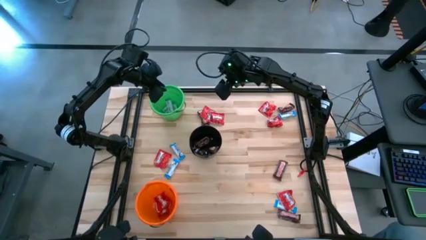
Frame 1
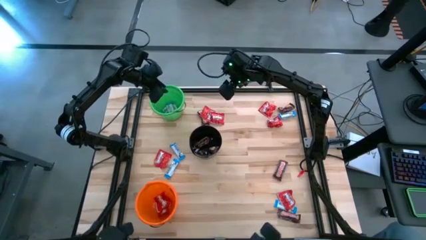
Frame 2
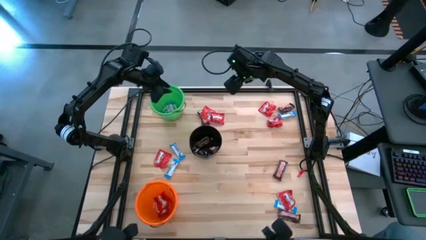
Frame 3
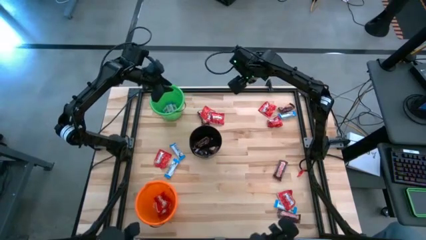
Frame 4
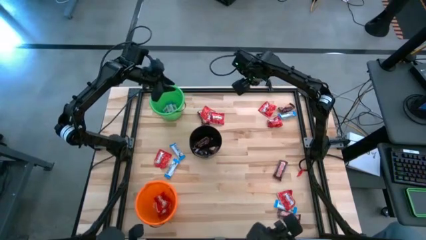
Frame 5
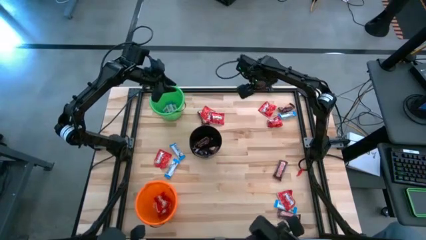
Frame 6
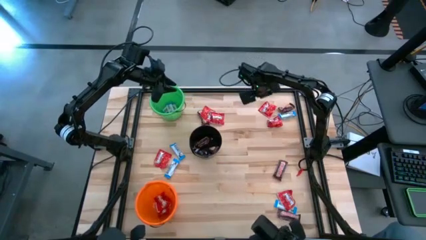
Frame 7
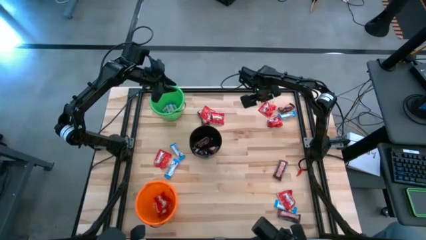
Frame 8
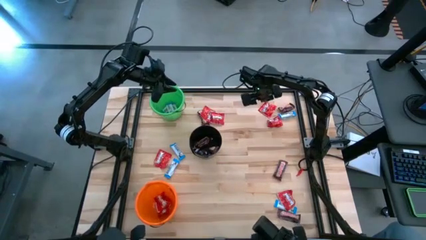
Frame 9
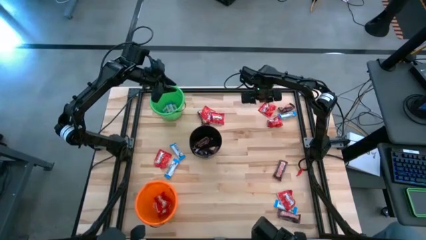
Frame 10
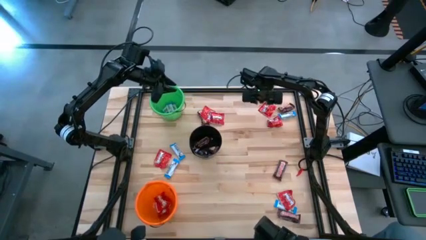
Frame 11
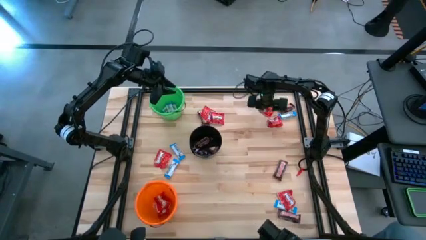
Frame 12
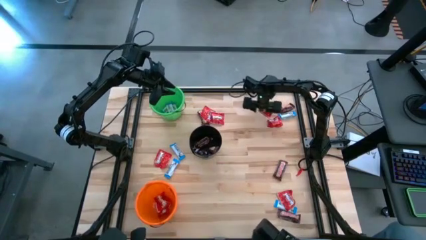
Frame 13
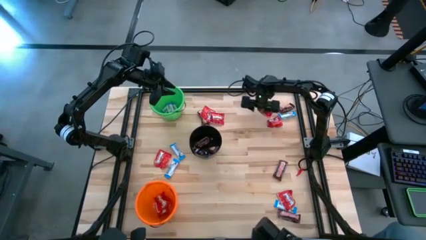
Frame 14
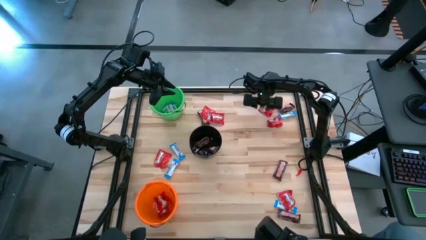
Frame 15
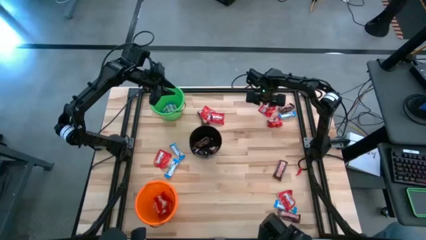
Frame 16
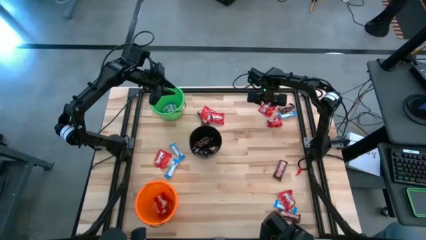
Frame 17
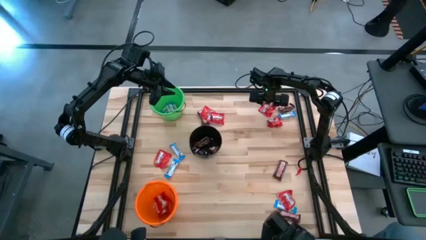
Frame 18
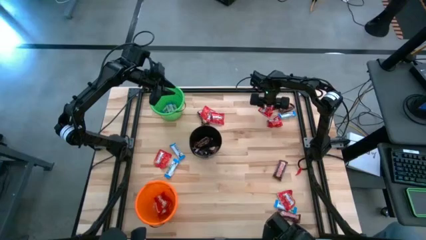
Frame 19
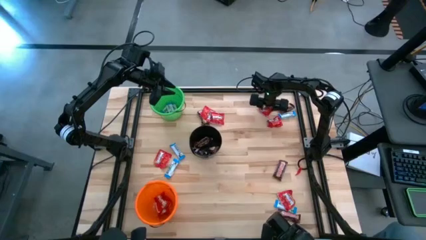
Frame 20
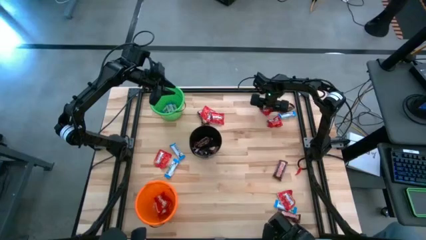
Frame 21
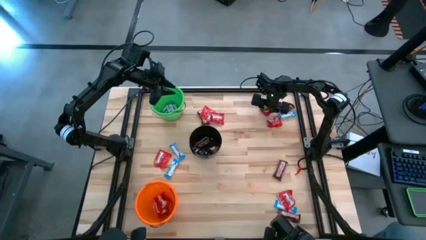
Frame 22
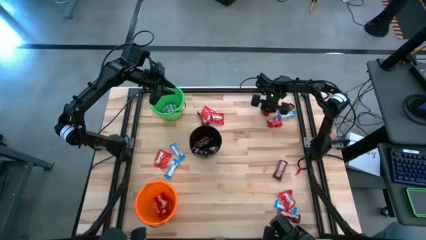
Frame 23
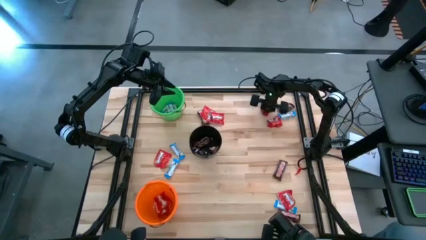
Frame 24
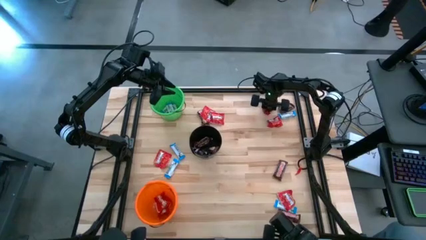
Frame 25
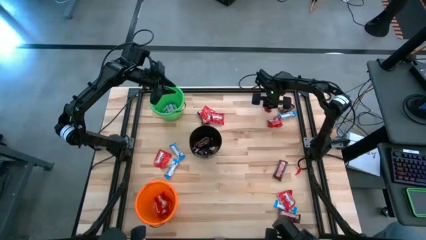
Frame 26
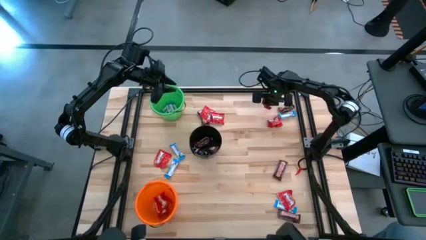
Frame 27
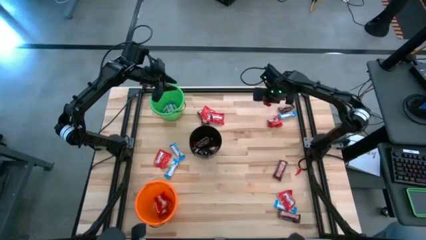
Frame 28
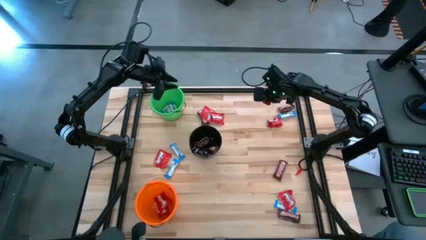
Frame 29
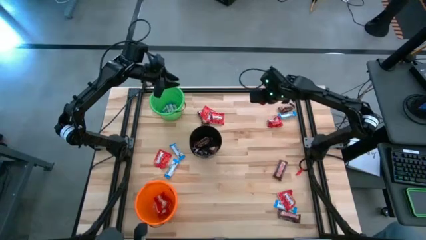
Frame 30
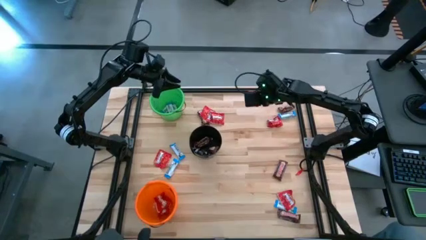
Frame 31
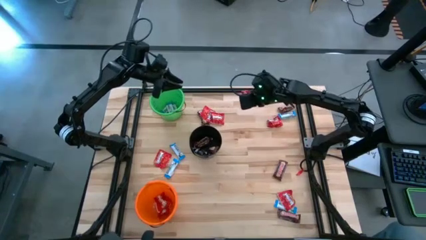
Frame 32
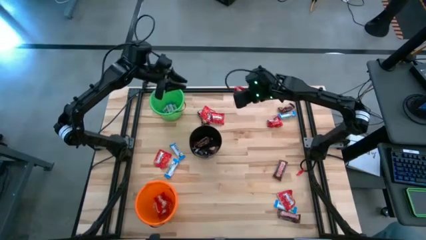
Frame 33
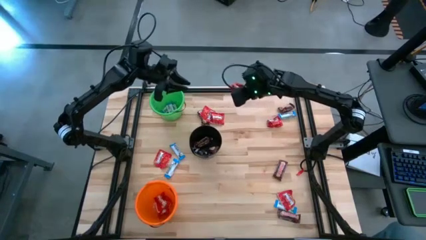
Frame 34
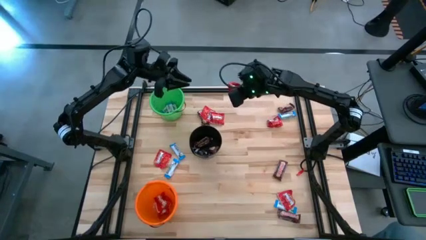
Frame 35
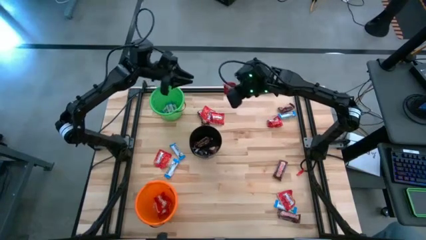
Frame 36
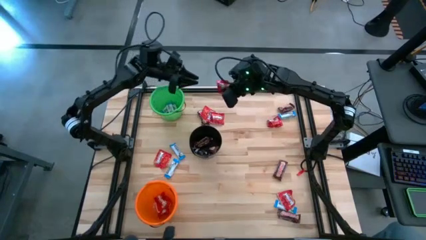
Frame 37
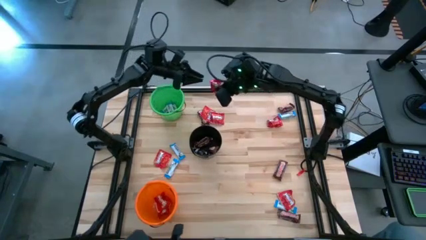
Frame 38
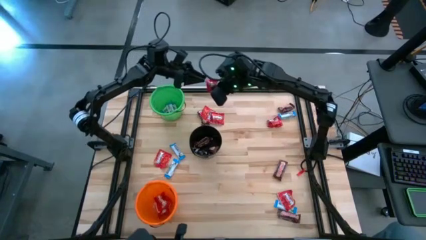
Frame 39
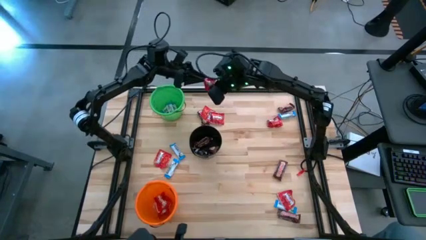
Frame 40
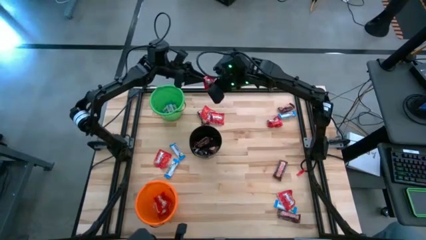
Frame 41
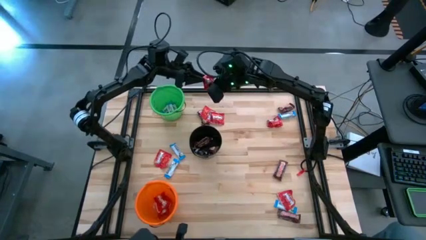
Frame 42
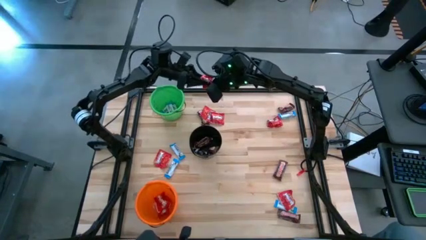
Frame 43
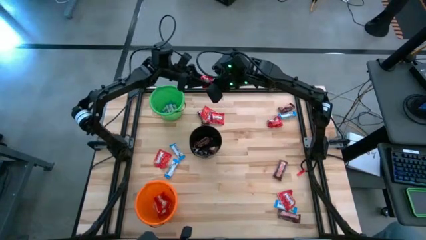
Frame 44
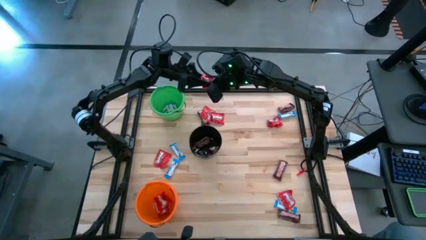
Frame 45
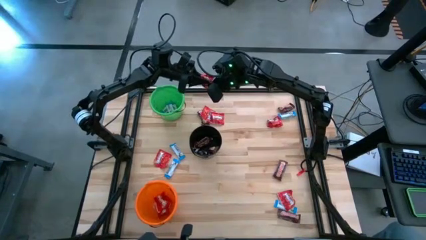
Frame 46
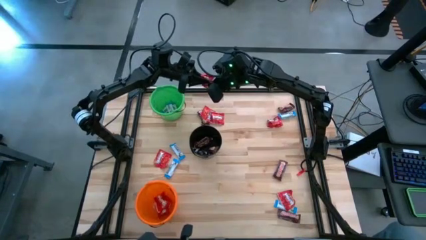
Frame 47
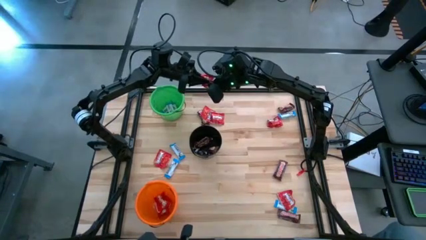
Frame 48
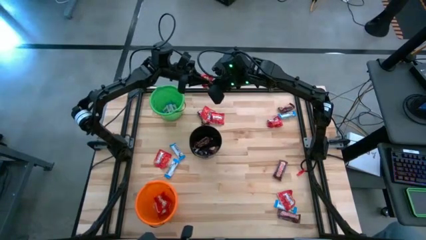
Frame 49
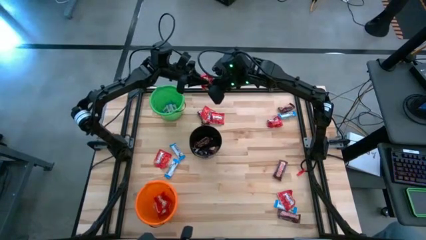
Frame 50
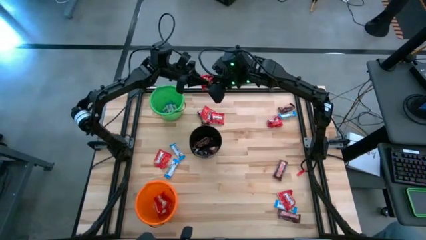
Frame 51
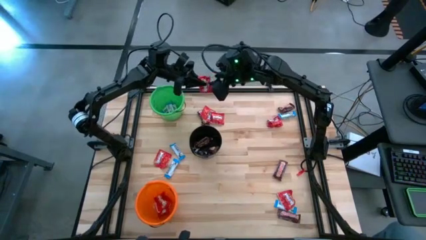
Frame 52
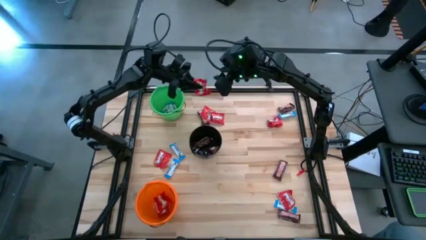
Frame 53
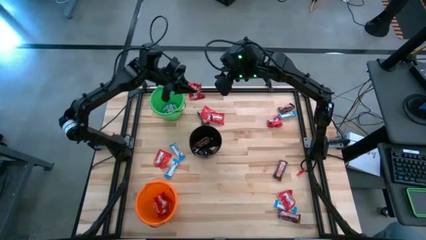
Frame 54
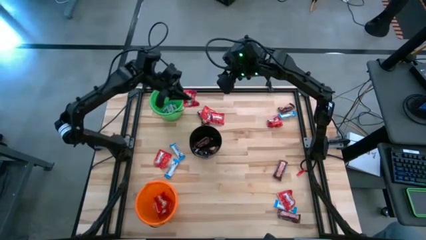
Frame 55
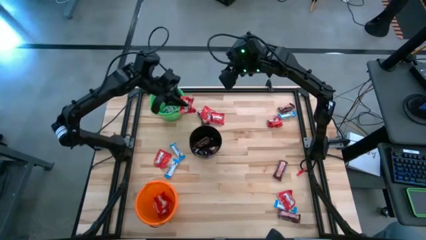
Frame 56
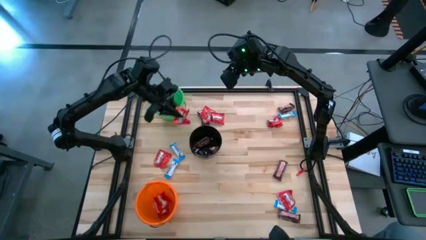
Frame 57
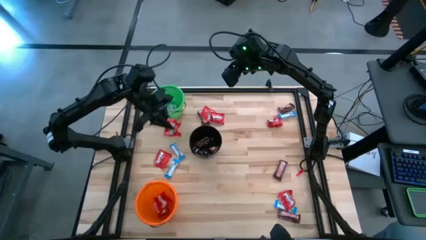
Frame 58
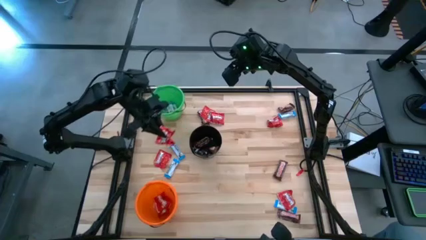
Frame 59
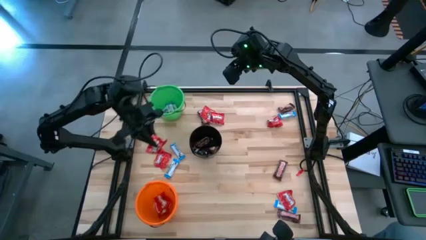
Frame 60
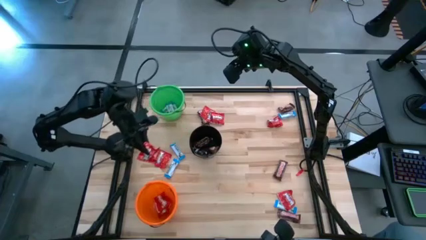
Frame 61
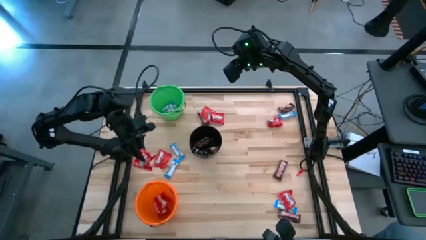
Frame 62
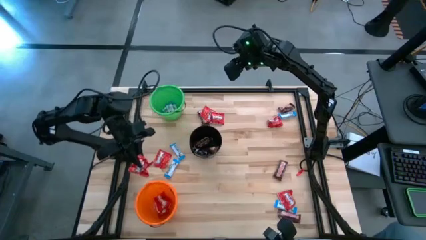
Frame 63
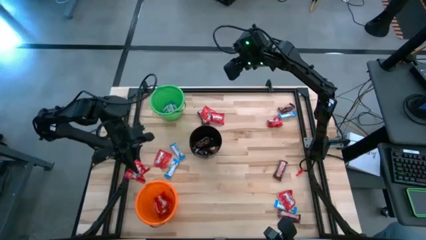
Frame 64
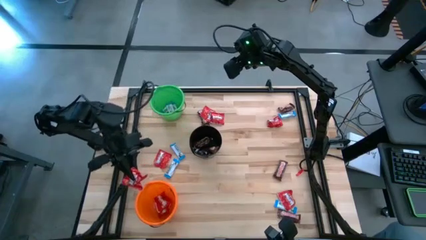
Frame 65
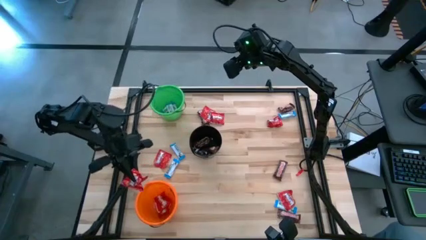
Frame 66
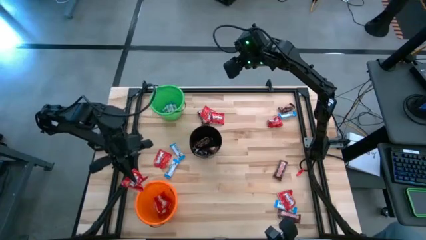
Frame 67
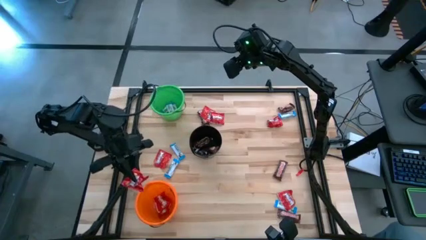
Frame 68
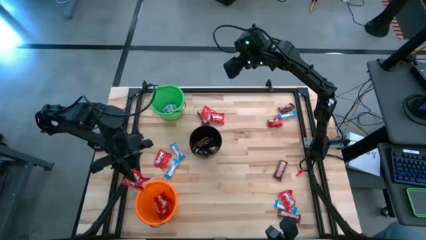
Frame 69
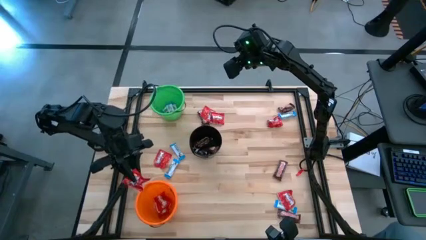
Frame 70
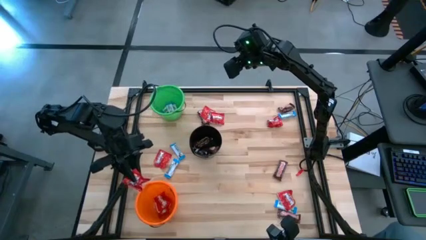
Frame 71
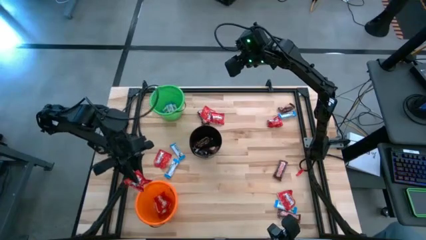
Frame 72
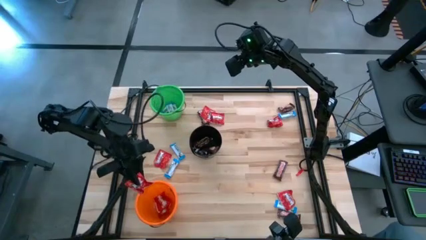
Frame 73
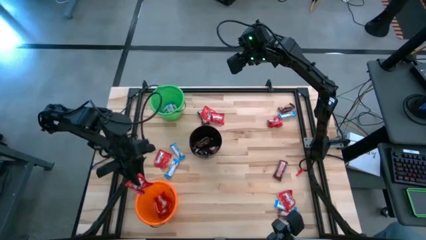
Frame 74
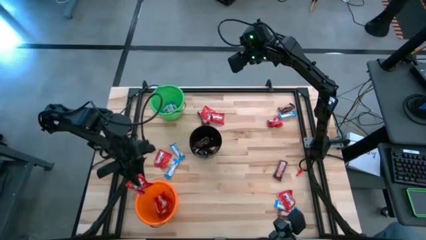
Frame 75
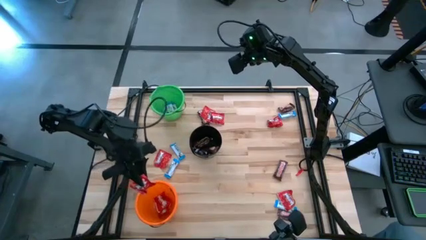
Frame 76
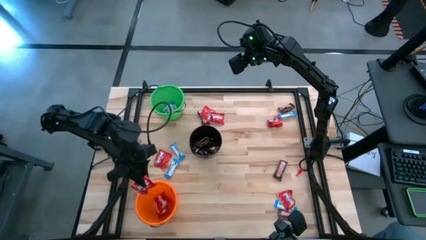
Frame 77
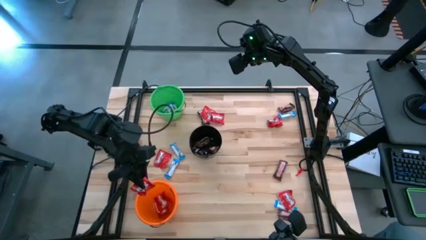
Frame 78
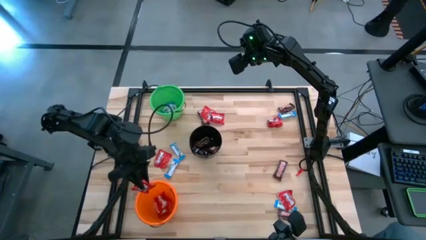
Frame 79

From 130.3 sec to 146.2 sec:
Task: Sort candy
Put the red candy pack into the orange bucket

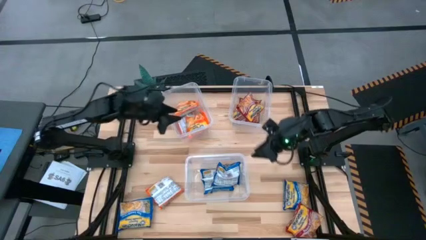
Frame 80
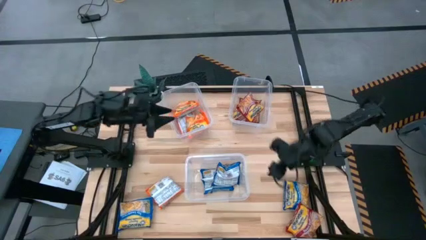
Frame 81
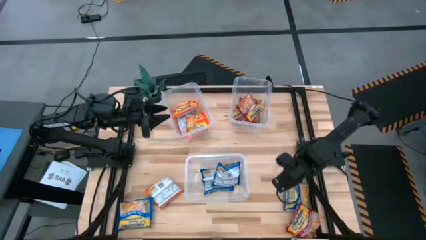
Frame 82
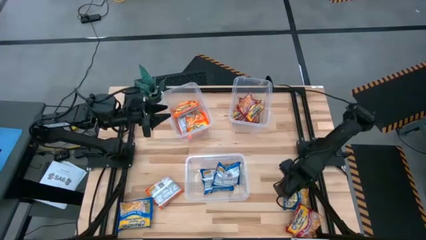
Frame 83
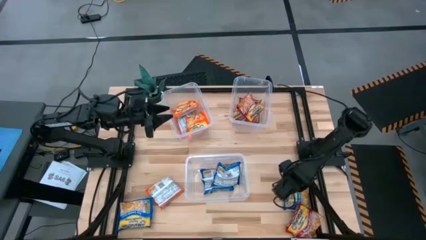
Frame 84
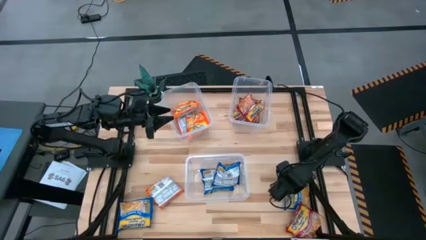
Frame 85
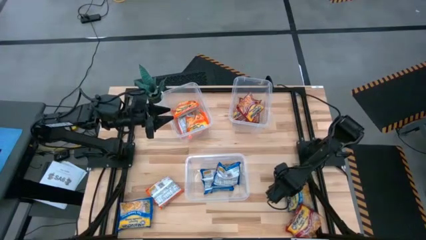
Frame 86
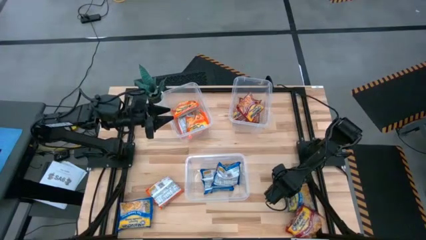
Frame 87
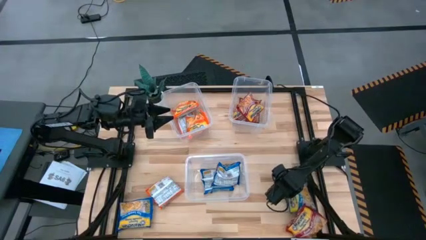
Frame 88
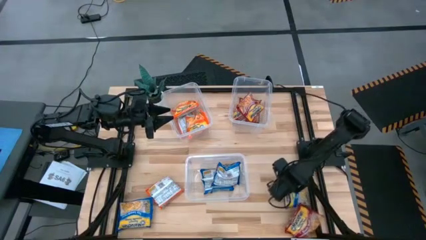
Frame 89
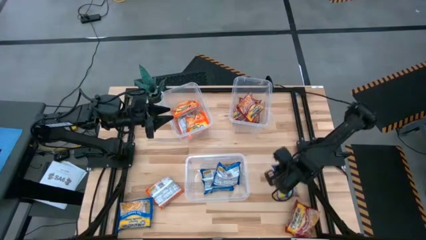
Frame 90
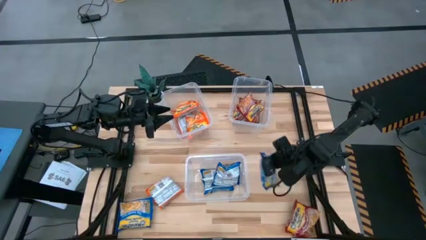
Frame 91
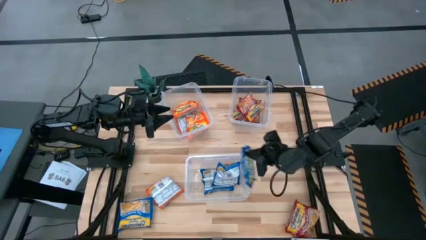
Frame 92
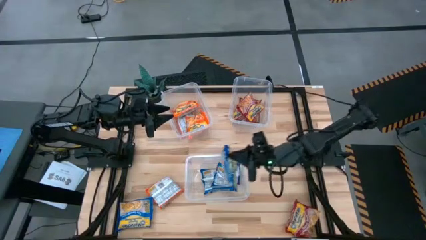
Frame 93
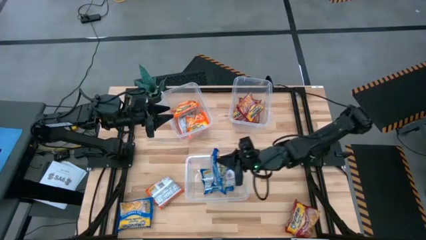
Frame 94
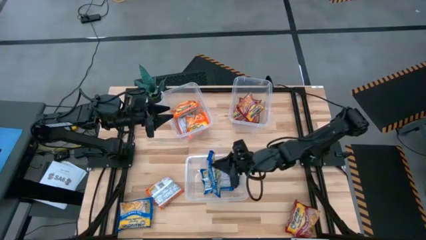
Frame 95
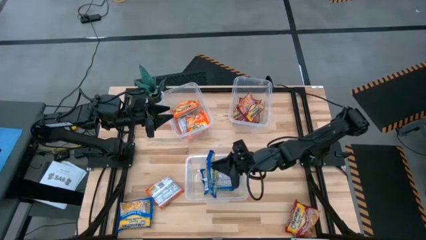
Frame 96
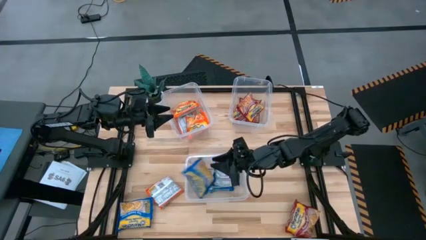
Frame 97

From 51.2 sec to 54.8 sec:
Task: Sort Maruchan noodles
Put the right blue bag into the bottom transparent bin
